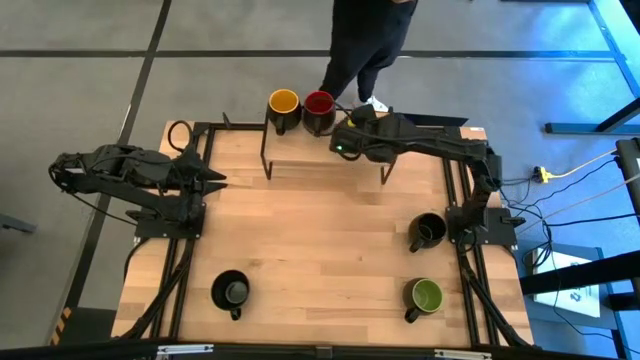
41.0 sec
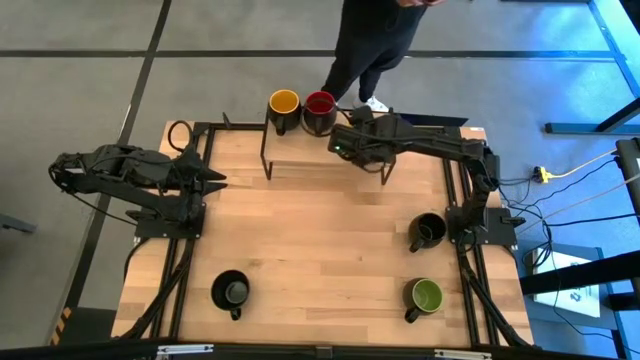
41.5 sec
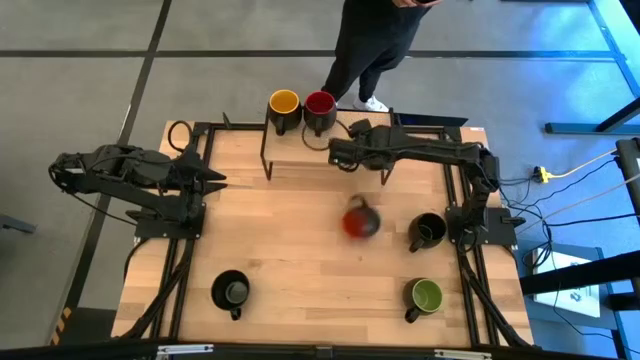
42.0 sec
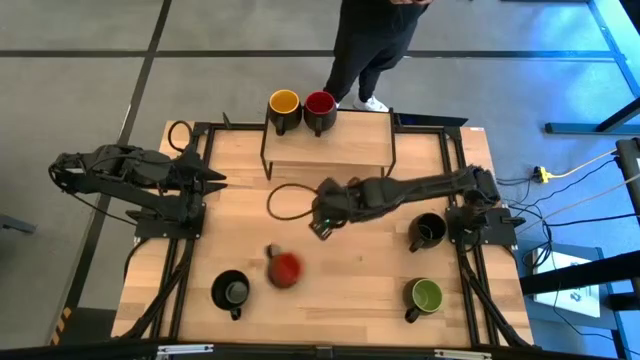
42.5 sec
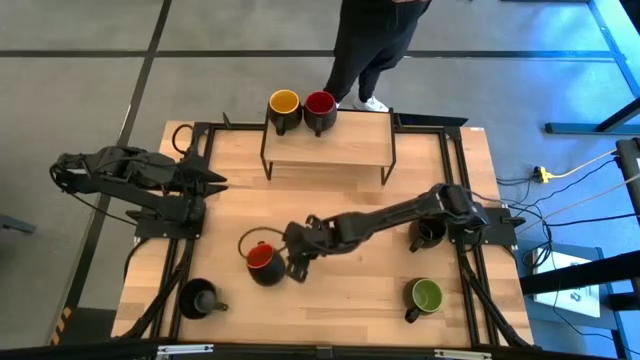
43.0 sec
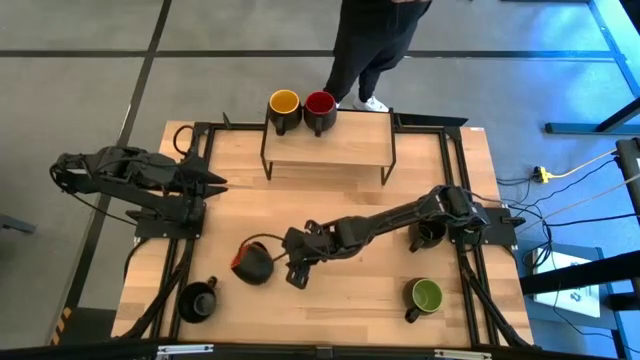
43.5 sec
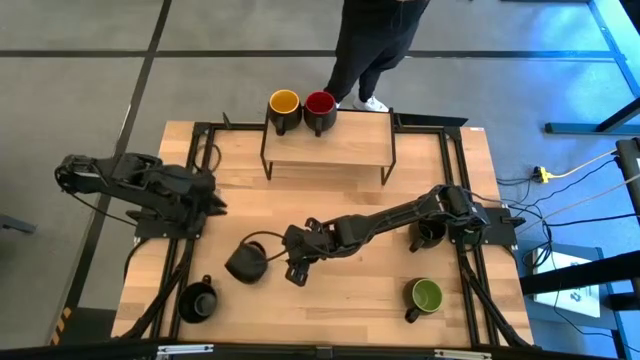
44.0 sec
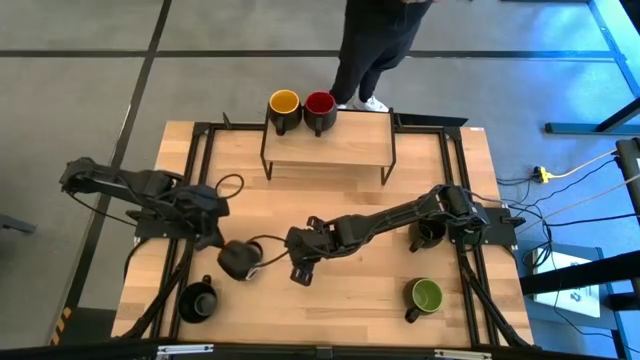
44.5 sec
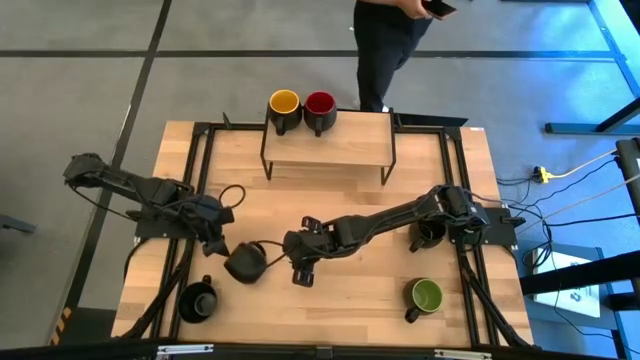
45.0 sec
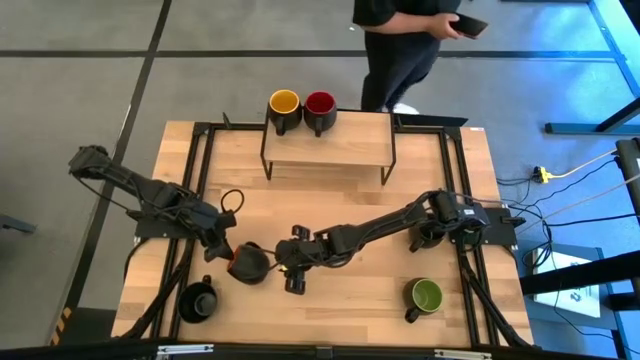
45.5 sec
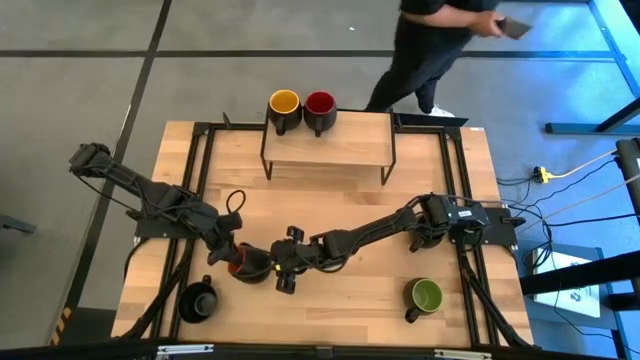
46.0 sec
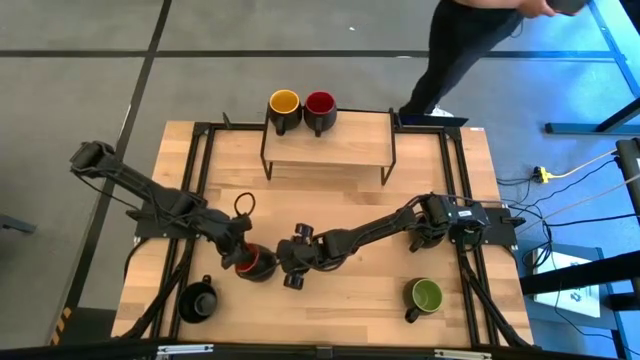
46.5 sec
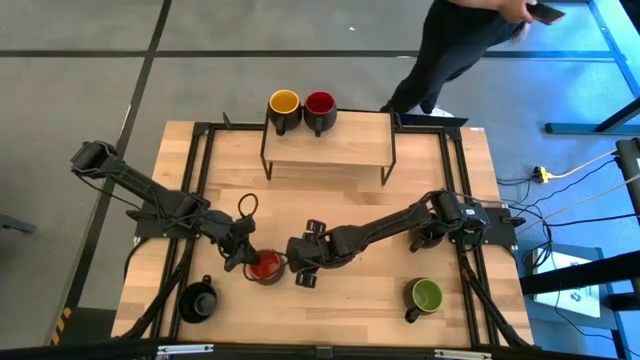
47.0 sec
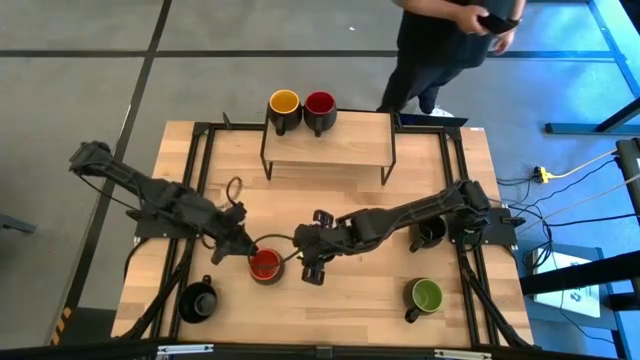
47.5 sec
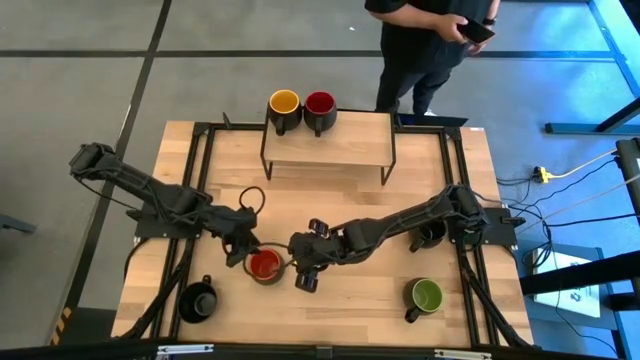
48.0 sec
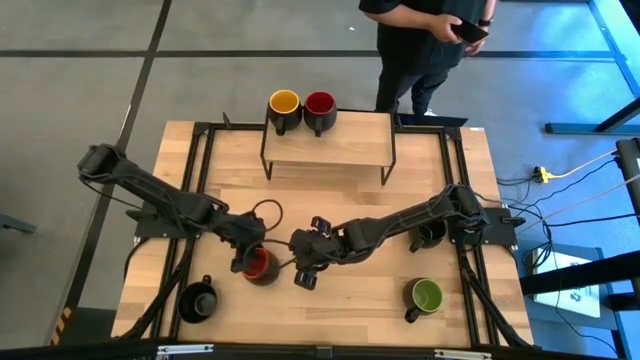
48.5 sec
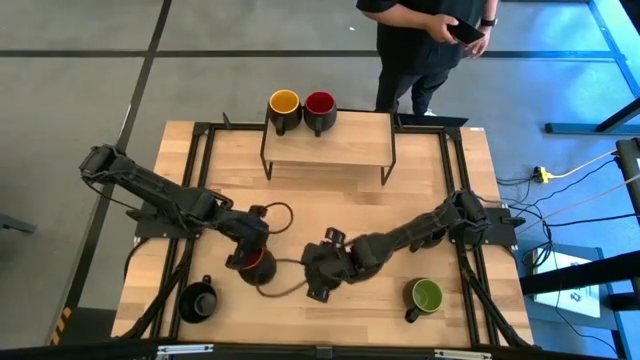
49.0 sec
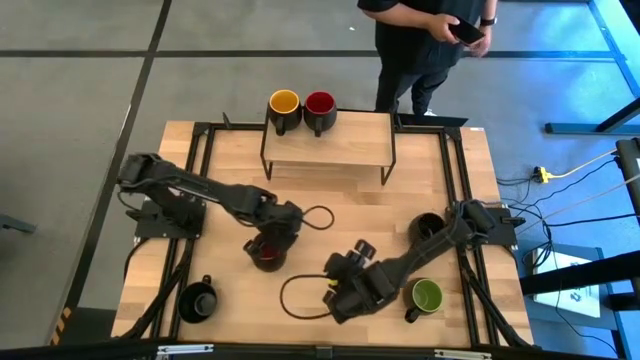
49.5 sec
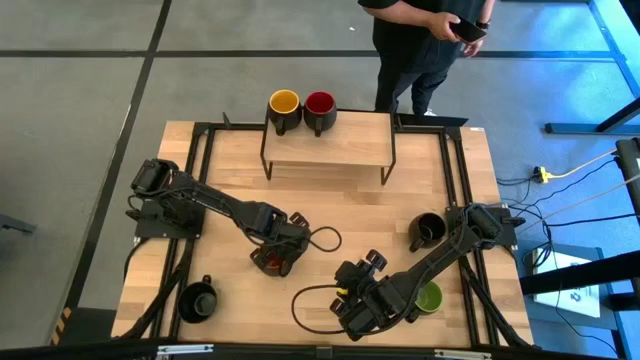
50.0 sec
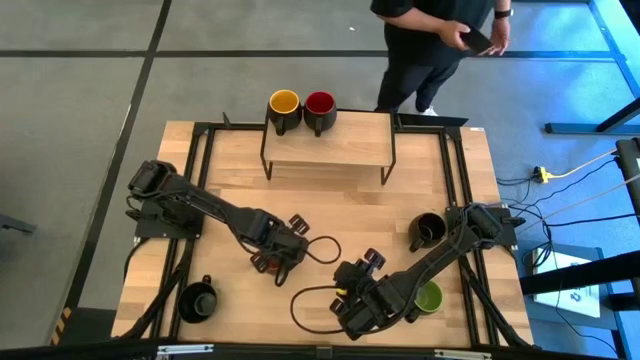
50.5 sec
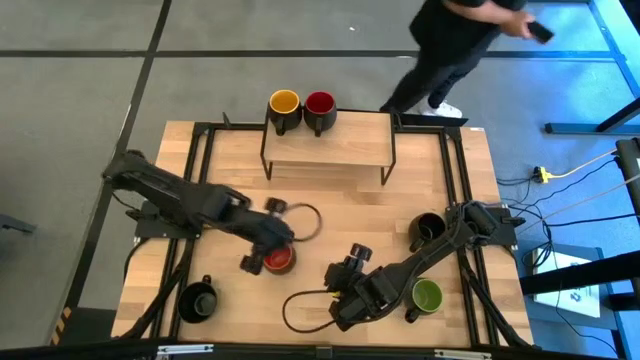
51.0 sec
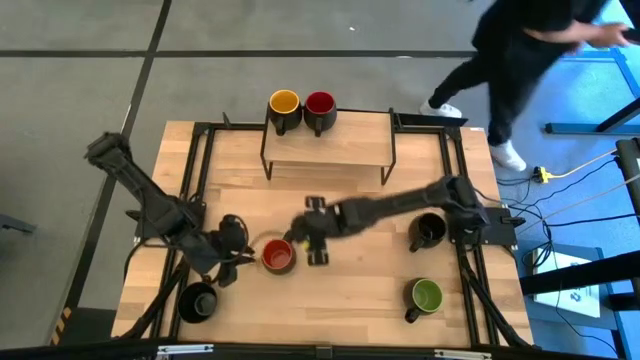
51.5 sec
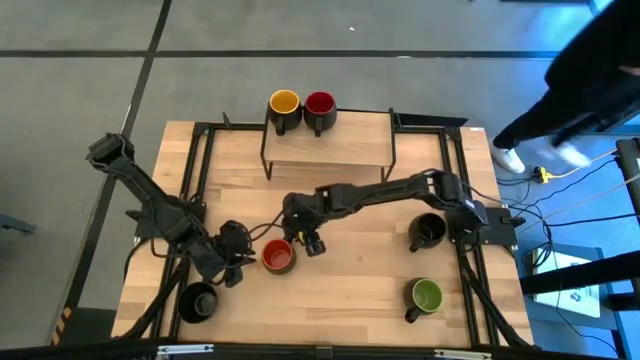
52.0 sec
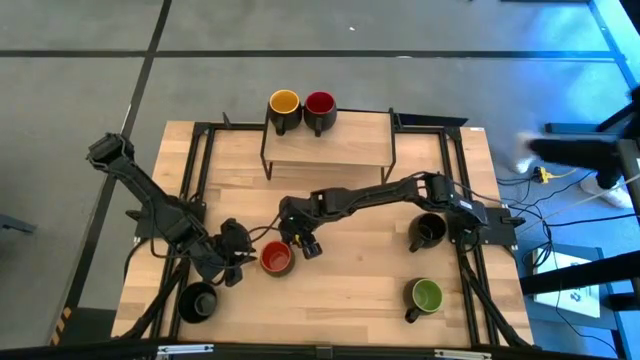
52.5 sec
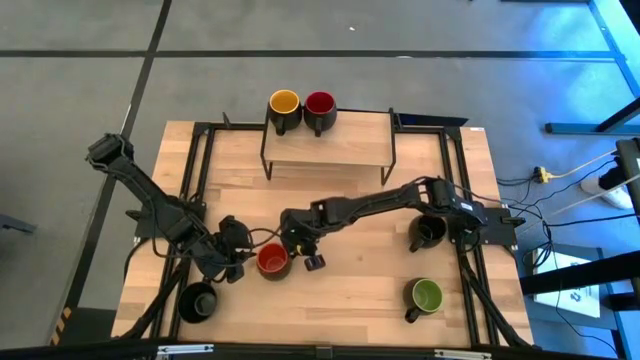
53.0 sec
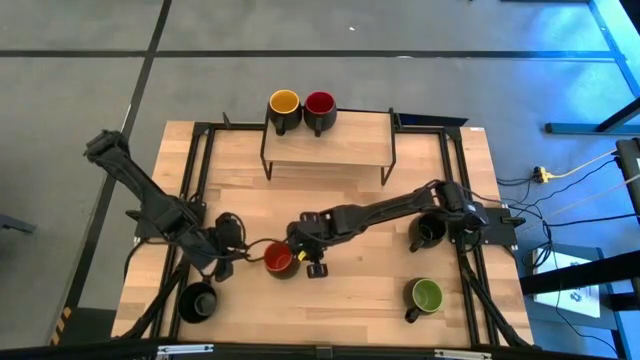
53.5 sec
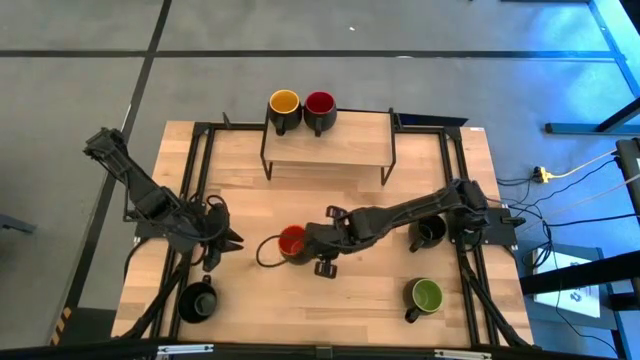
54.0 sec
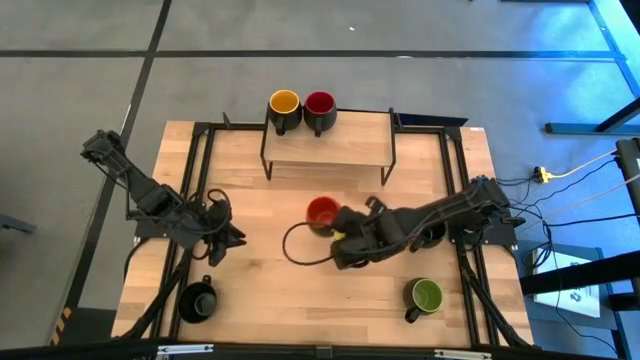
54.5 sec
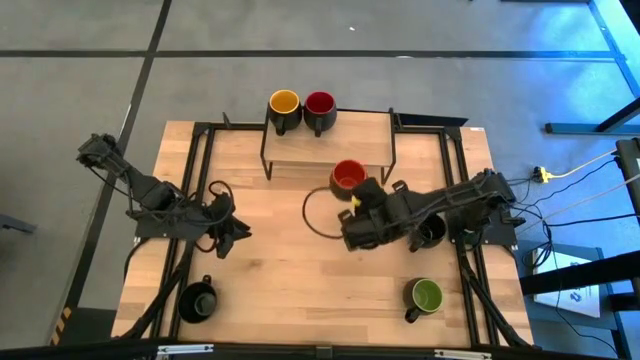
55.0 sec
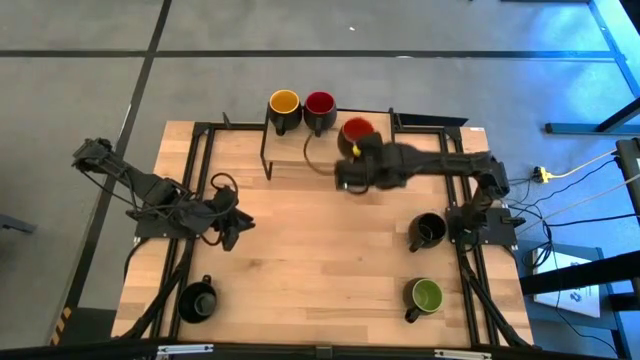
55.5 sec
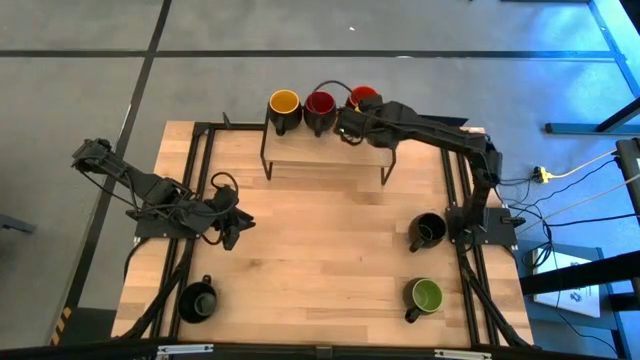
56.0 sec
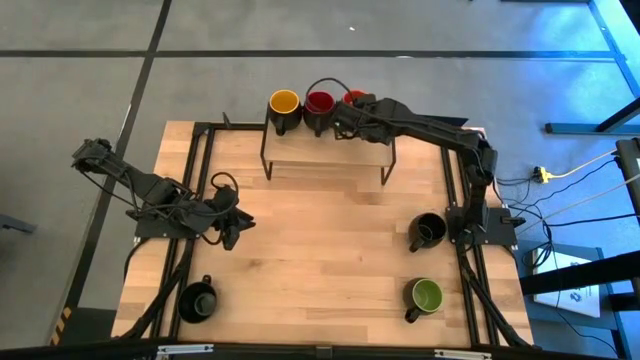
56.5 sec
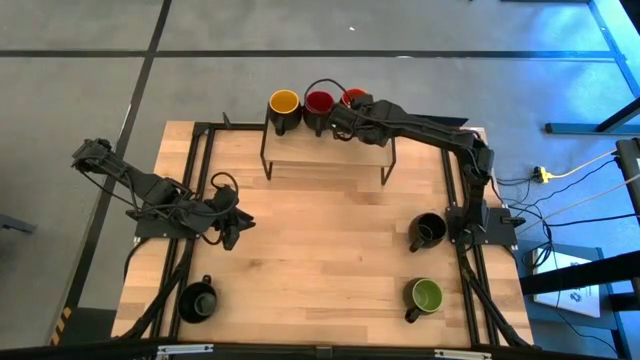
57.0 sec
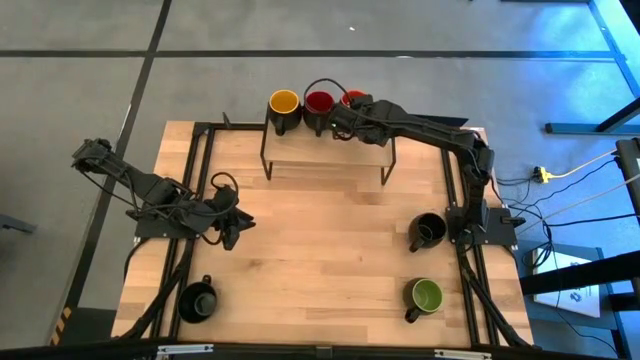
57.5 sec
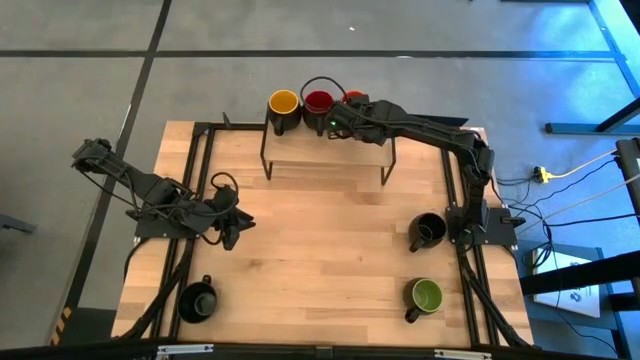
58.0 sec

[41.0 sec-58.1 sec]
Task: Place coffee mugs
Put the orange mug on the shelf

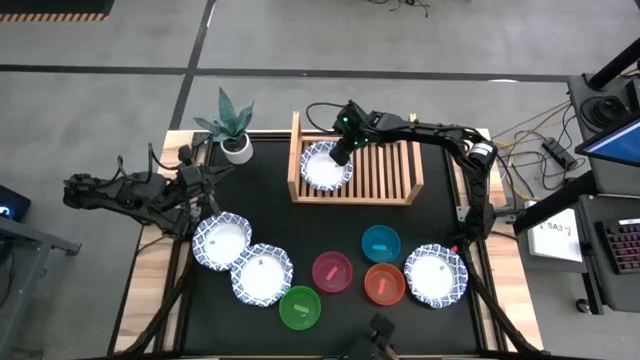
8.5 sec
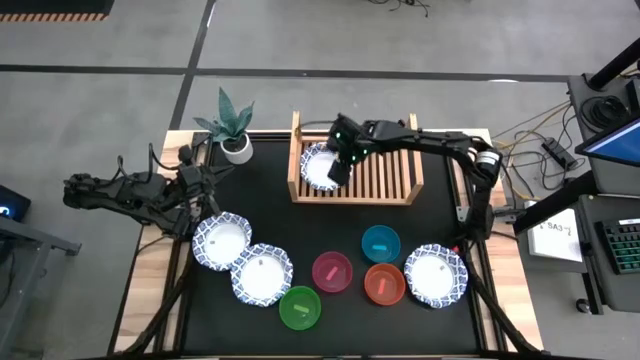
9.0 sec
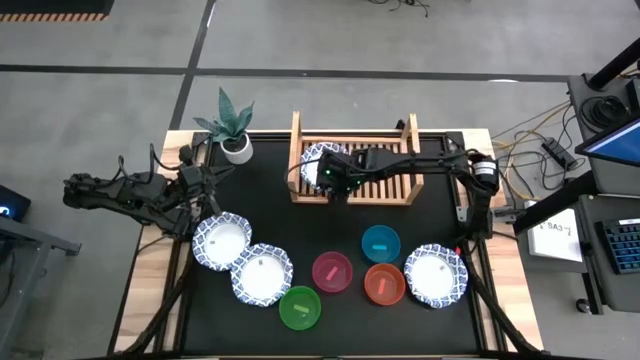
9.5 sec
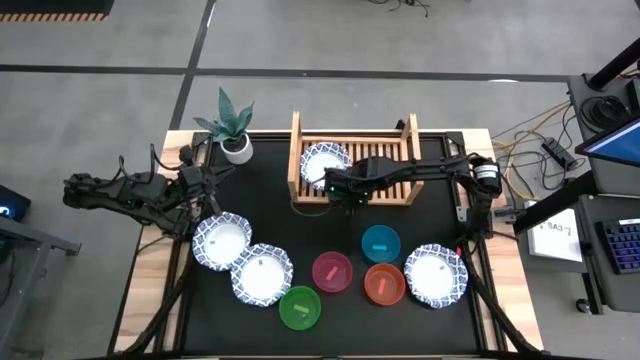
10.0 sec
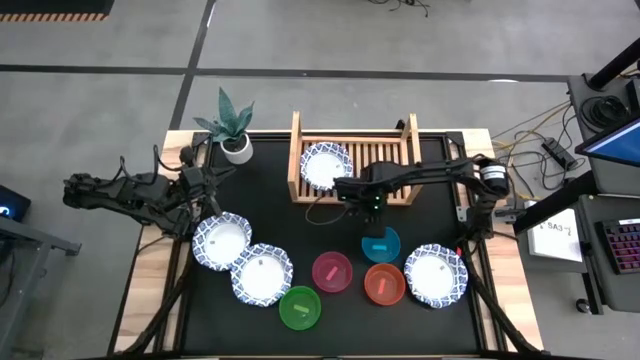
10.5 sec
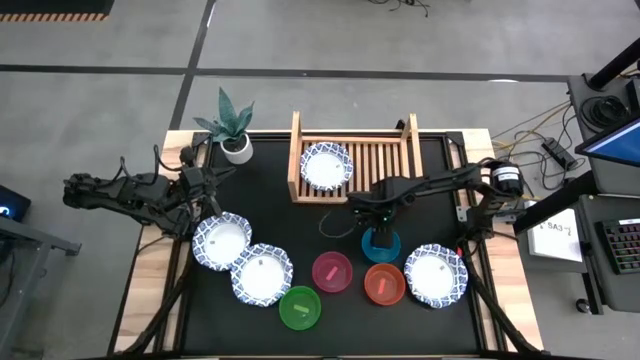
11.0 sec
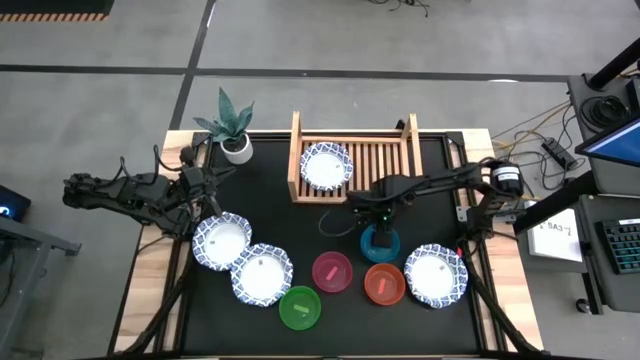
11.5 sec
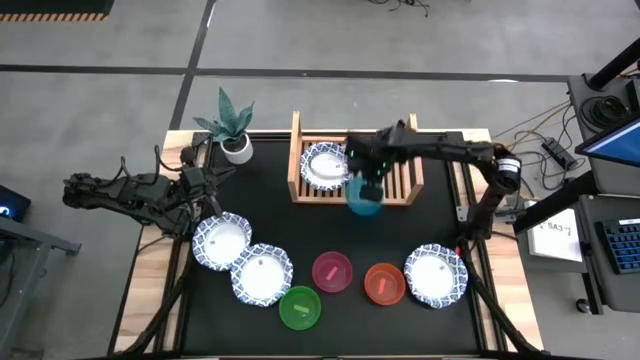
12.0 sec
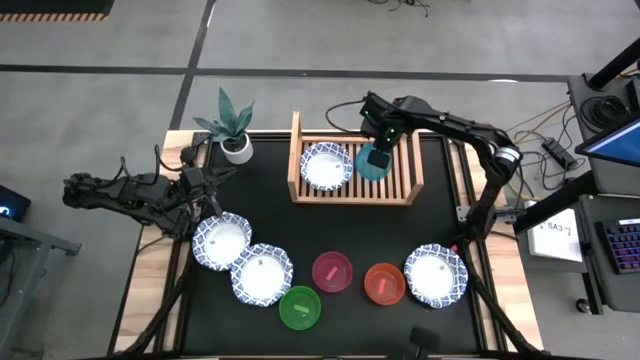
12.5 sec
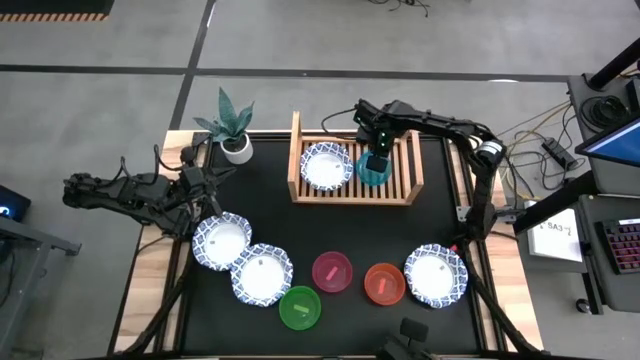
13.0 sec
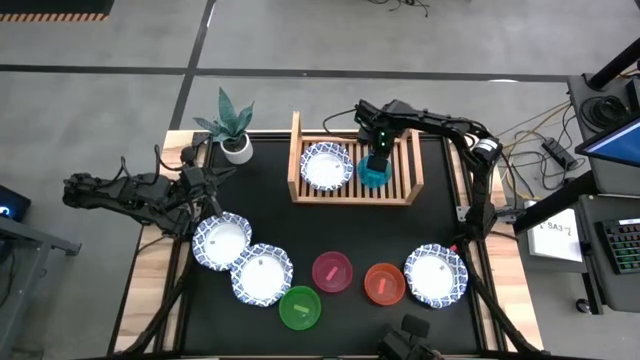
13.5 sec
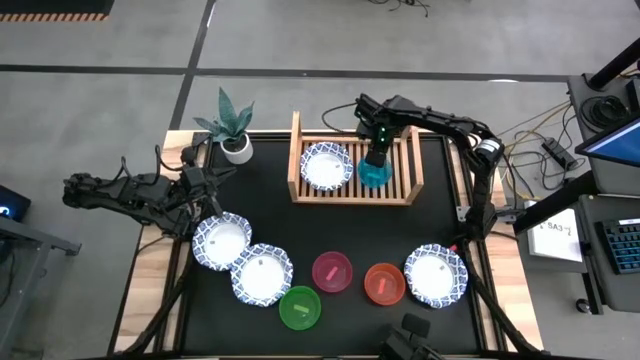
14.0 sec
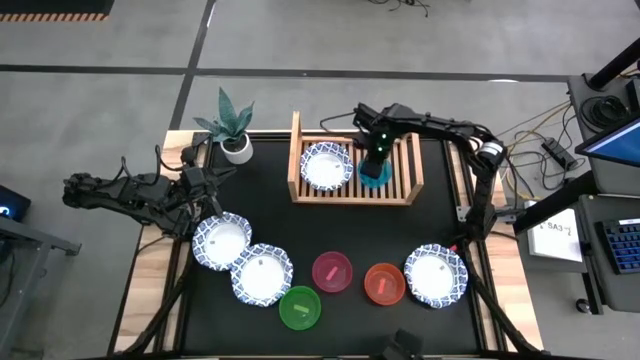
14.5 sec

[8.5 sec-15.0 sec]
Task: Place and stack bowls onto a shelf
Put the blue bowl on the shelf
